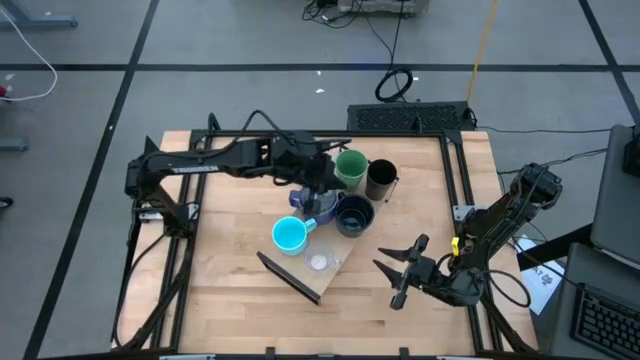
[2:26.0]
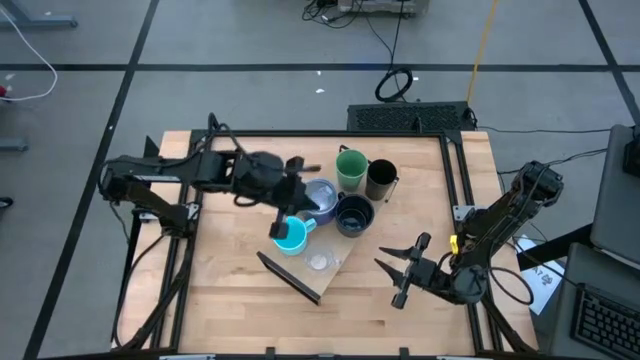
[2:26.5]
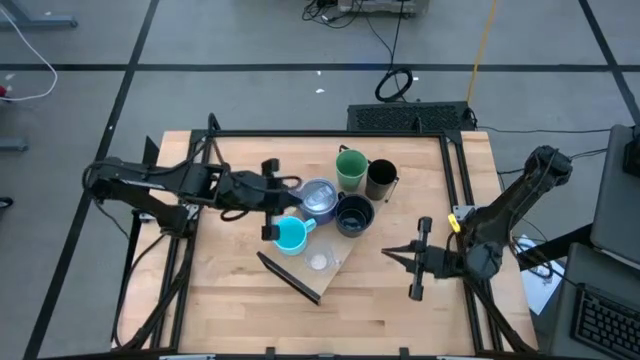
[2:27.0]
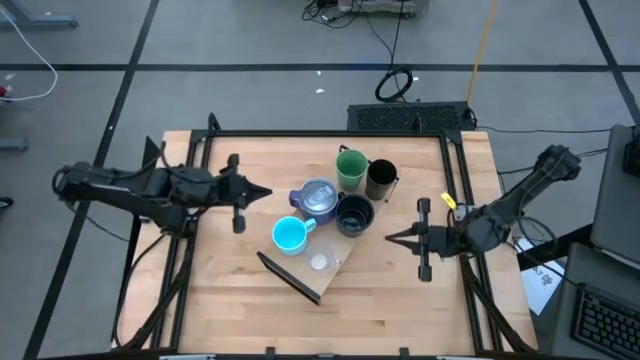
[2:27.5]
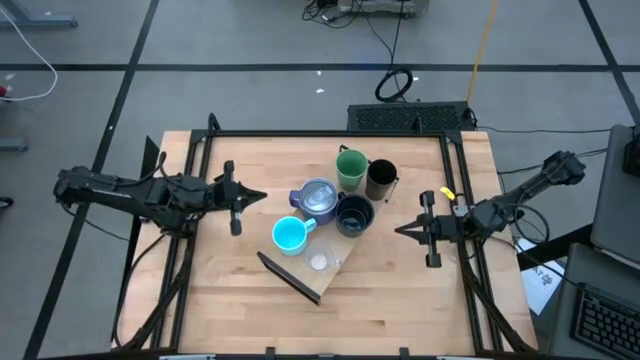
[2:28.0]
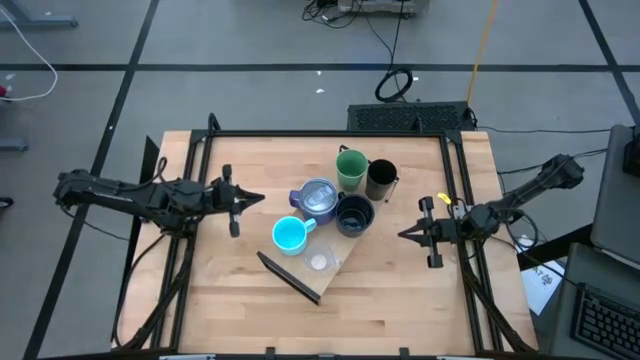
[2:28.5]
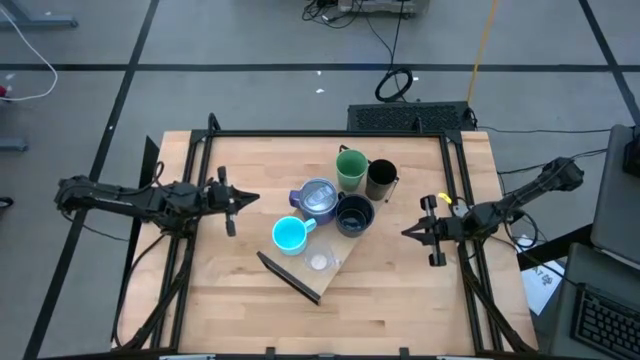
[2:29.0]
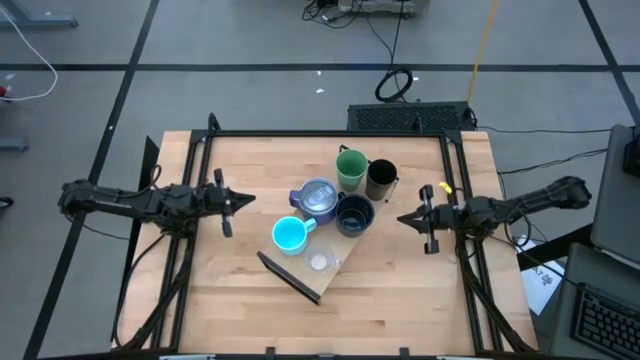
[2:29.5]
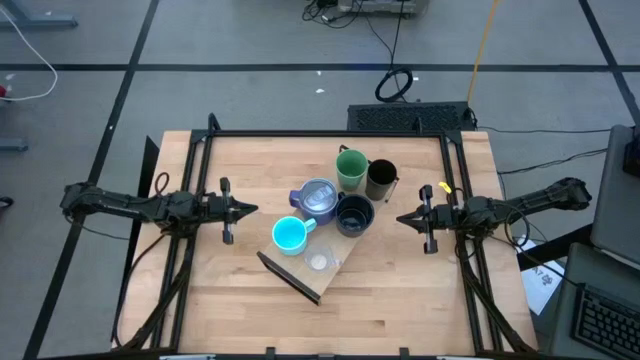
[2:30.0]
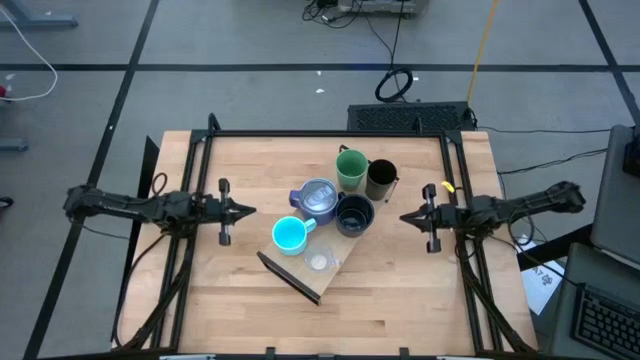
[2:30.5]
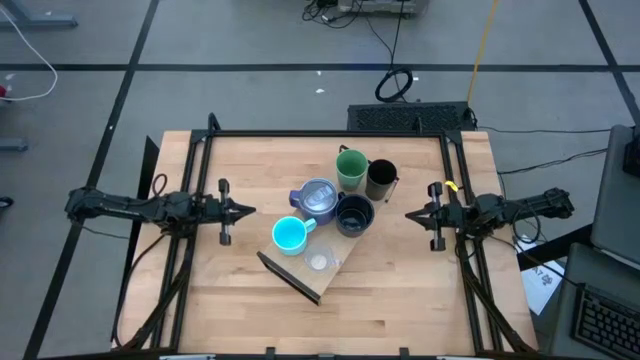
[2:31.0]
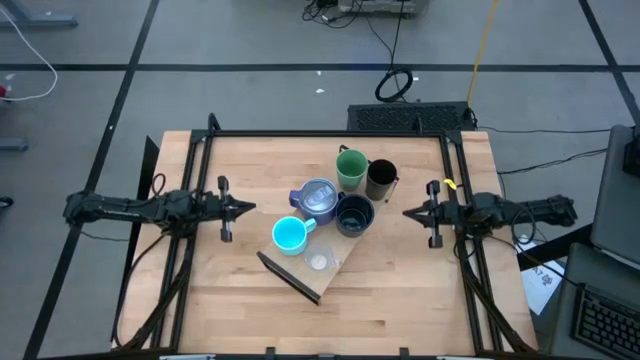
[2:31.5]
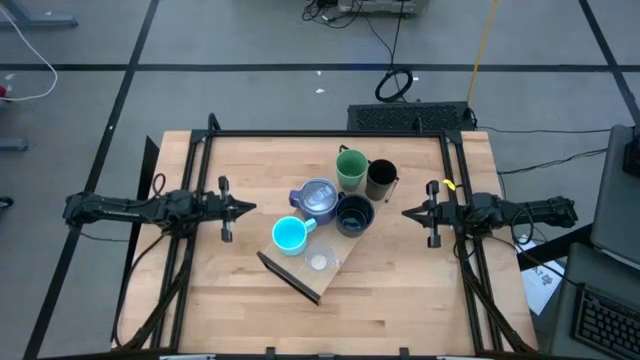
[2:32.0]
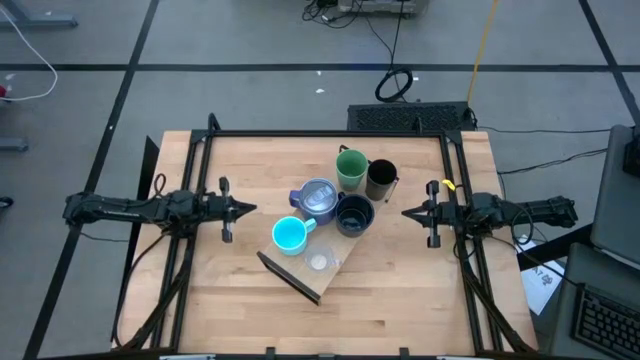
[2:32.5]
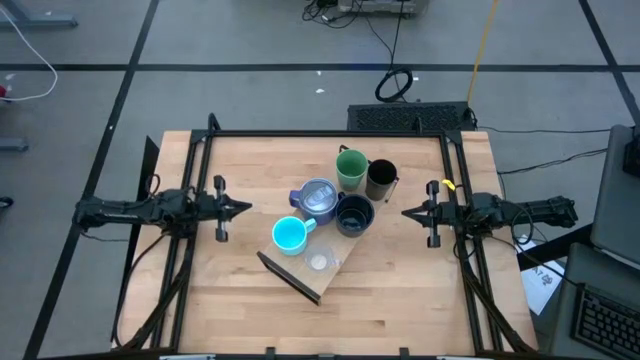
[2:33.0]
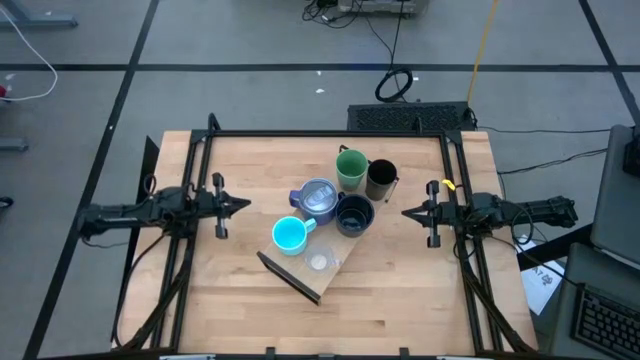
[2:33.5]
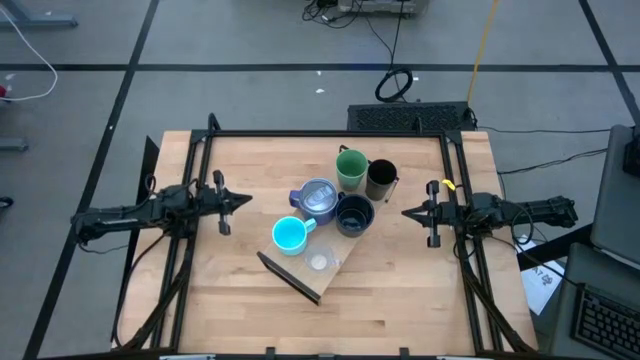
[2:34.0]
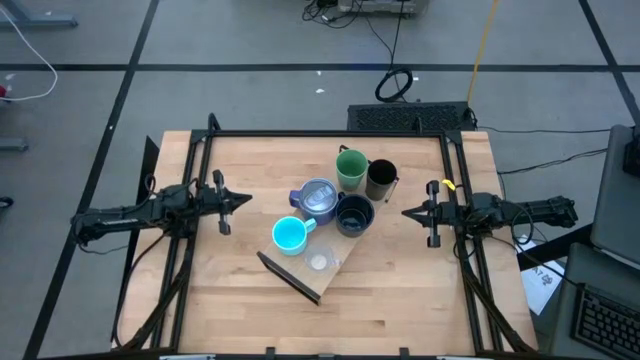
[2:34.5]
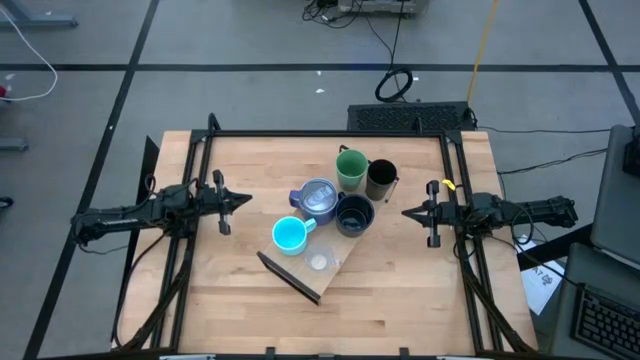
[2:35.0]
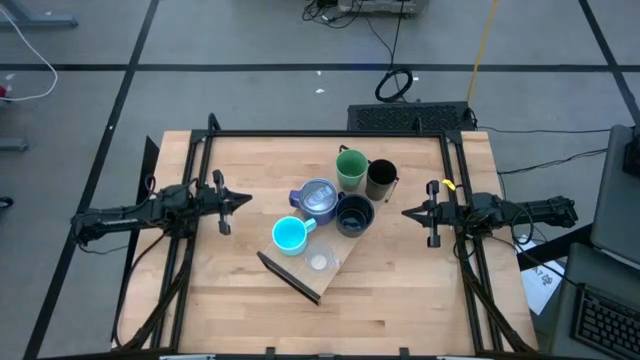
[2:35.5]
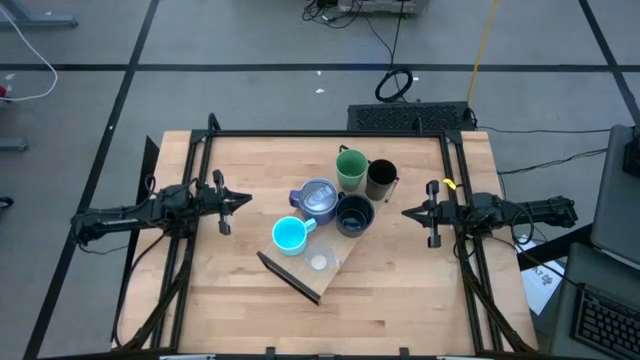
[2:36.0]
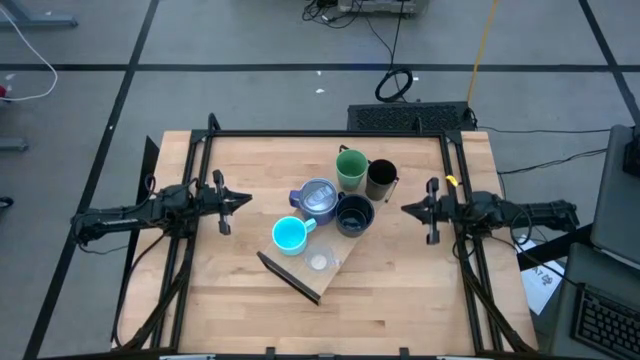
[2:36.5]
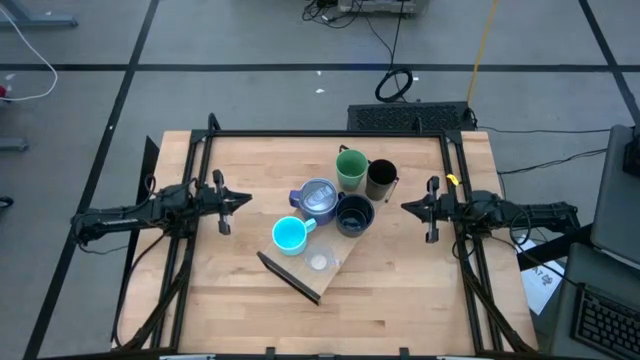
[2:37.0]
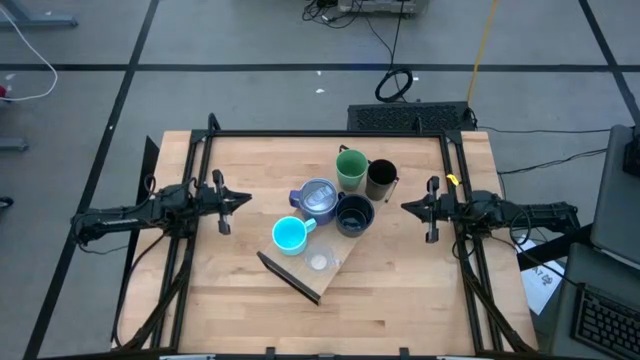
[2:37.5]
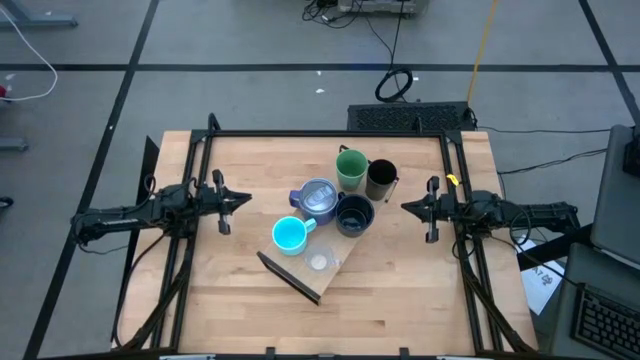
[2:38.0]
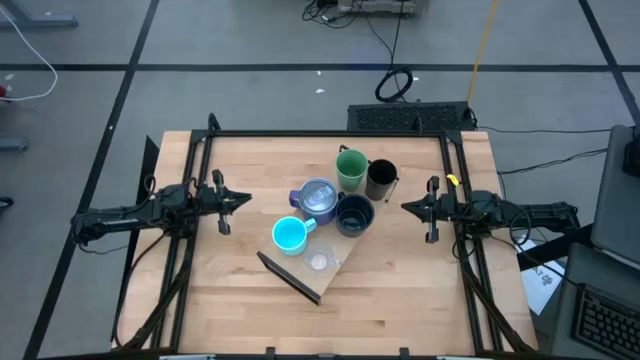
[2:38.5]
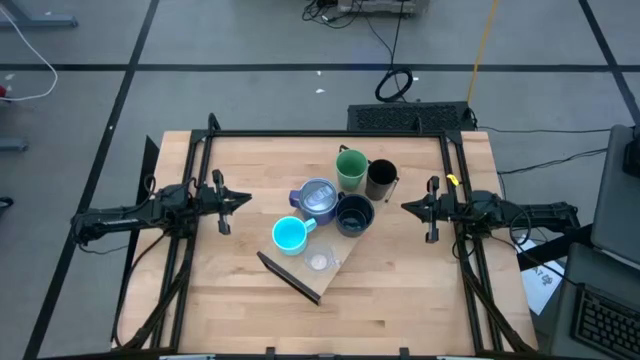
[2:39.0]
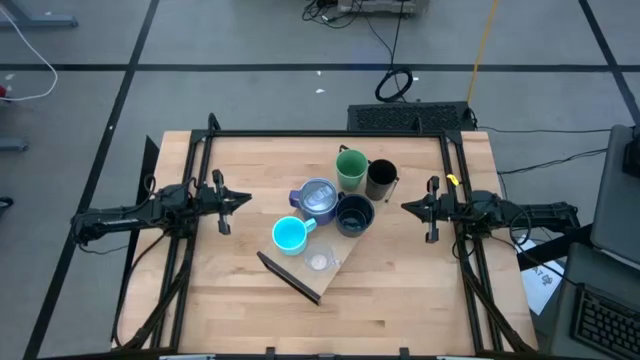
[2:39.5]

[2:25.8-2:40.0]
Task: Stack small to large cups/mugs on shelf
Return to Home Position

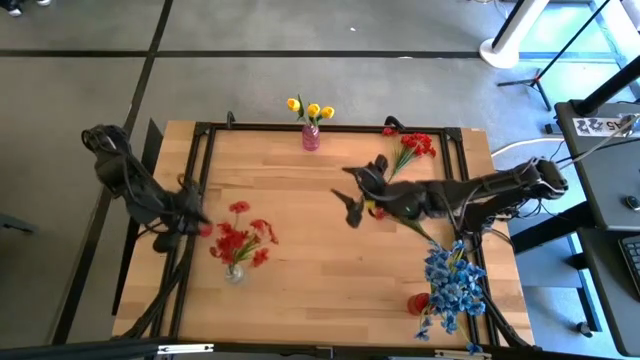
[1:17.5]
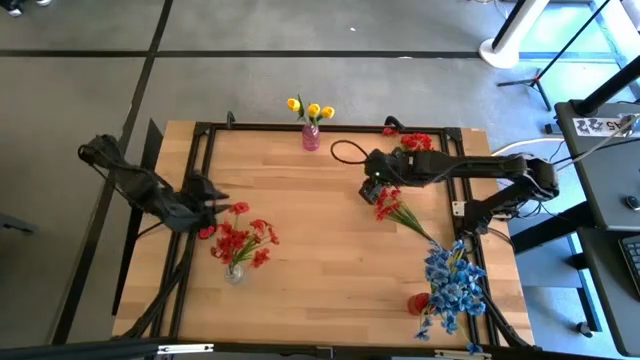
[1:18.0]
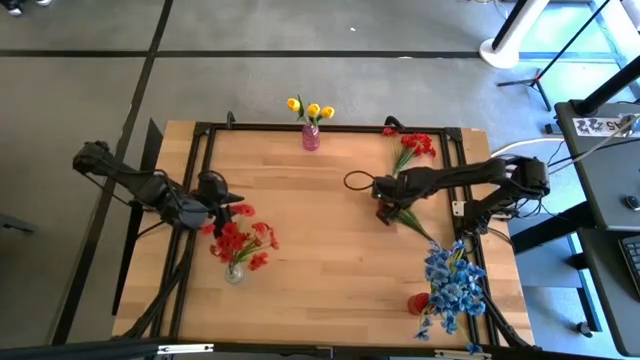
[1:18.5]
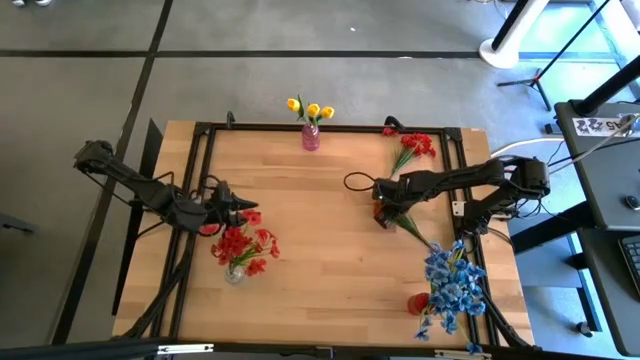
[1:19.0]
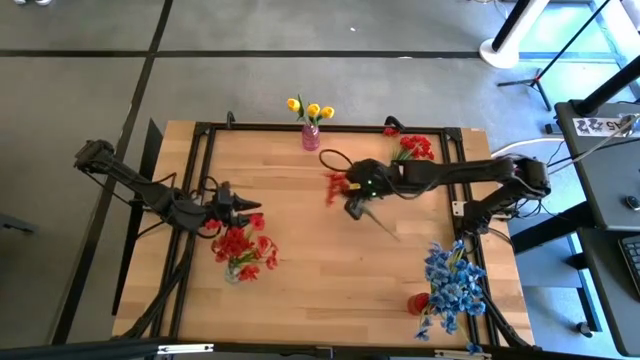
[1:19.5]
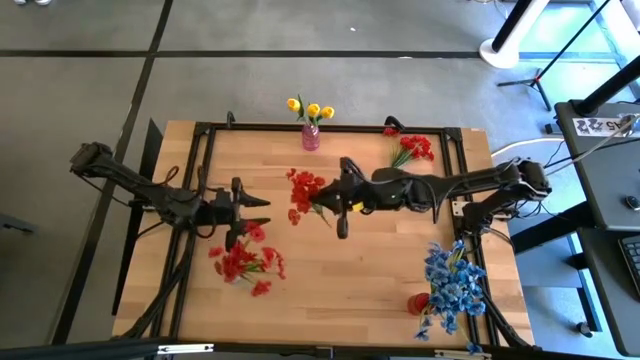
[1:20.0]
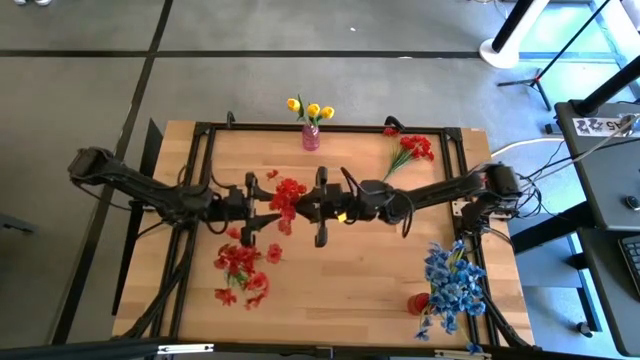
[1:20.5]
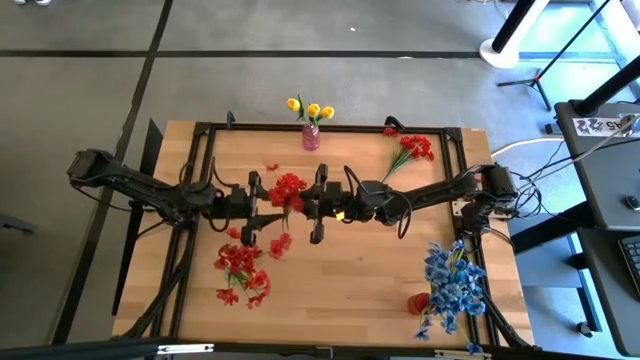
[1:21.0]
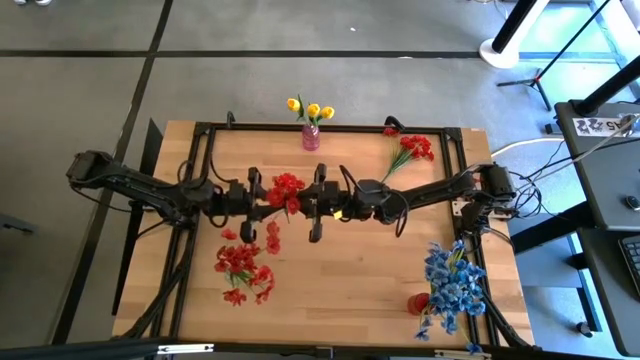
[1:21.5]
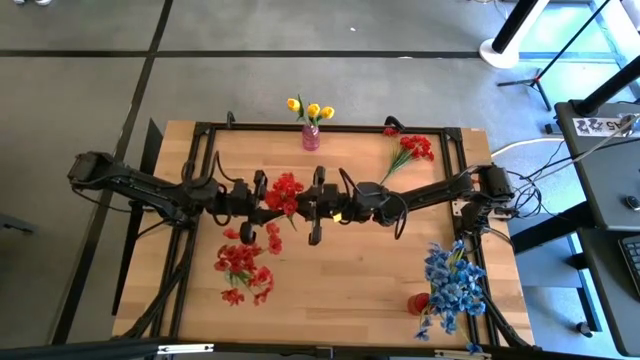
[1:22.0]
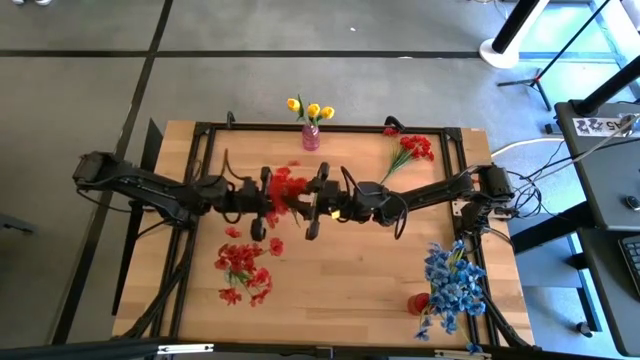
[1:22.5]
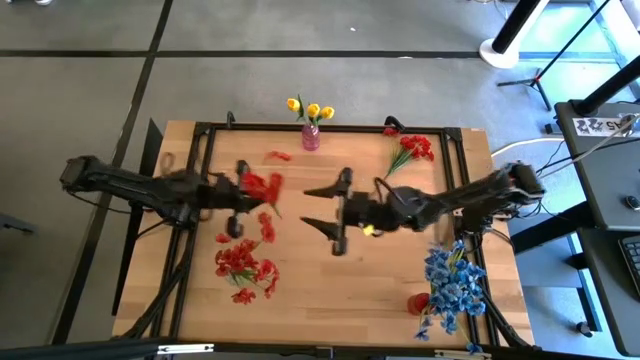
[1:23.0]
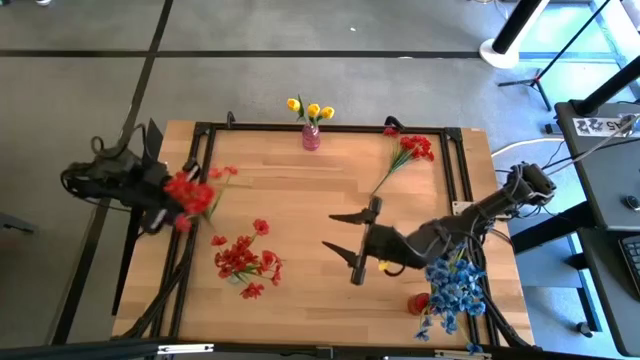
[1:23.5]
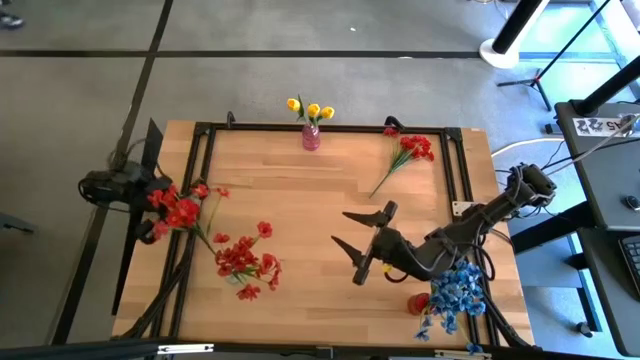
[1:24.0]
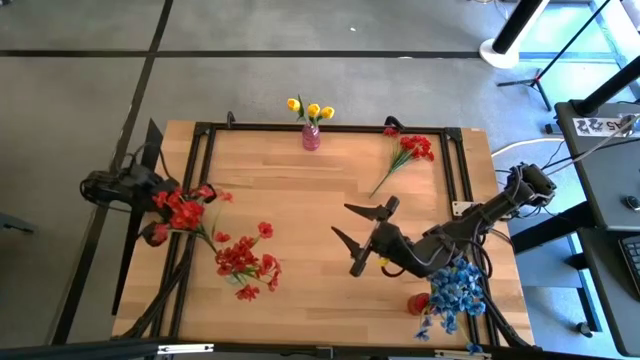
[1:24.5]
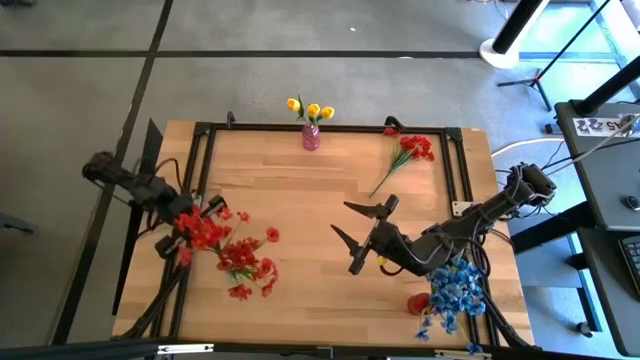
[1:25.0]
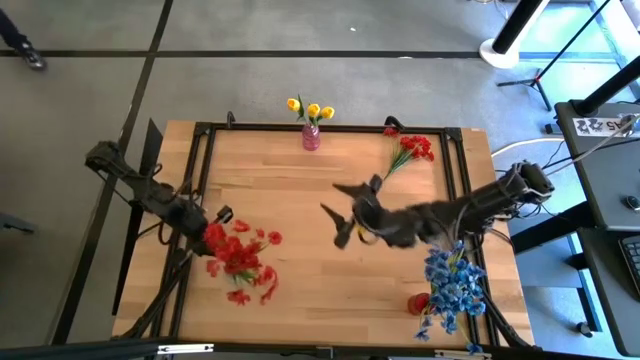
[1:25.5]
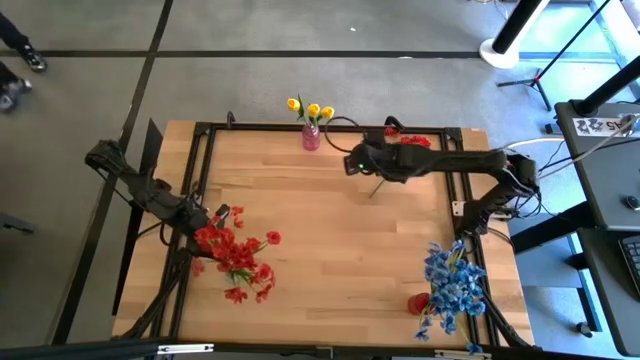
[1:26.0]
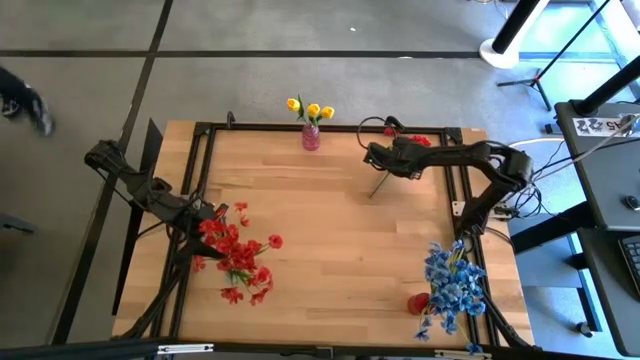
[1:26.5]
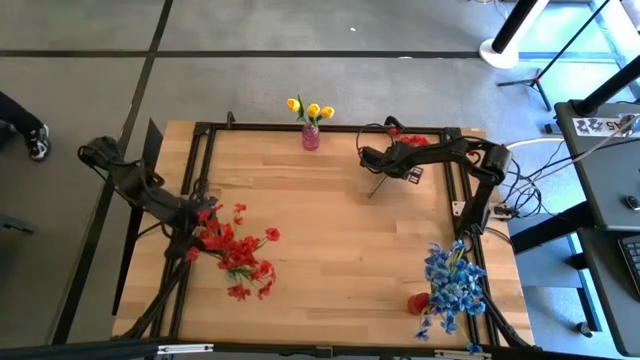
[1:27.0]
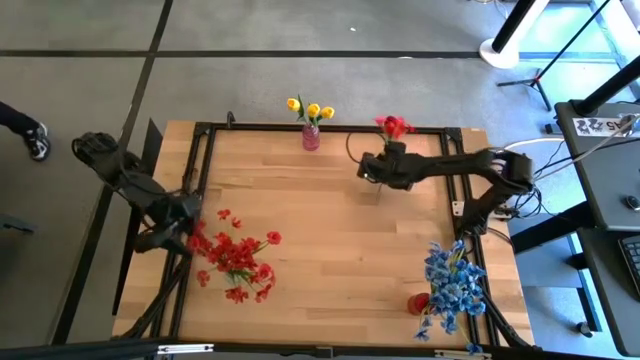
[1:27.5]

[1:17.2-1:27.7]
Task: Sort flowers into vase by color
Put the bottom flowers into the transparent vase
